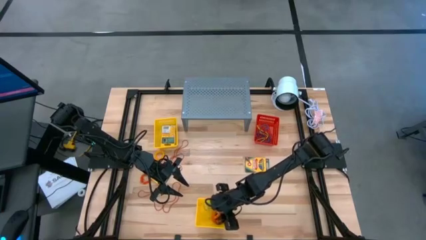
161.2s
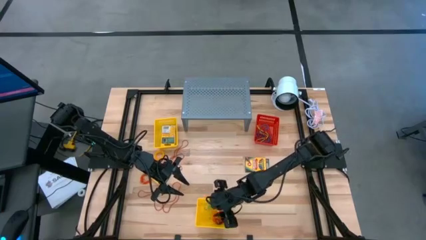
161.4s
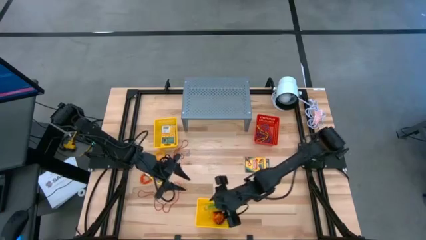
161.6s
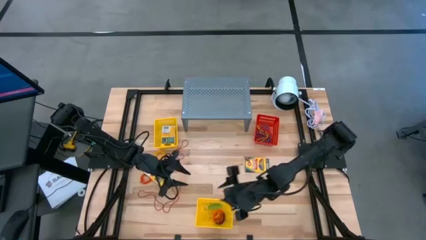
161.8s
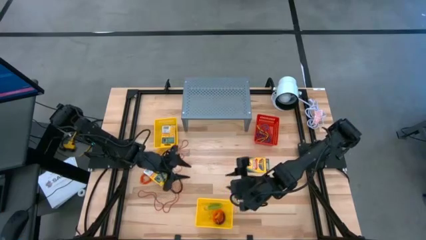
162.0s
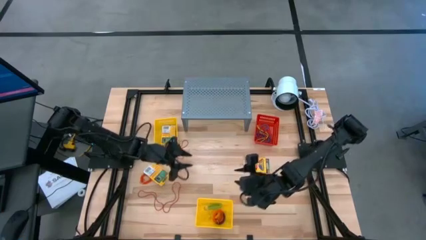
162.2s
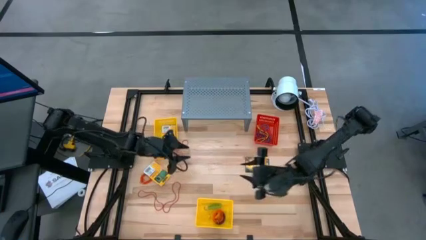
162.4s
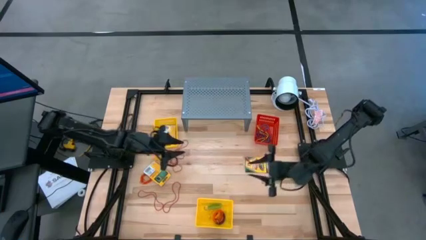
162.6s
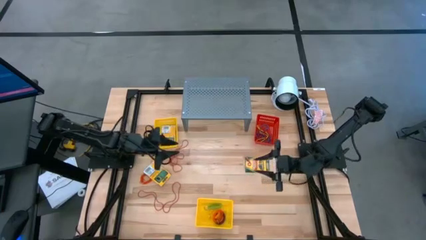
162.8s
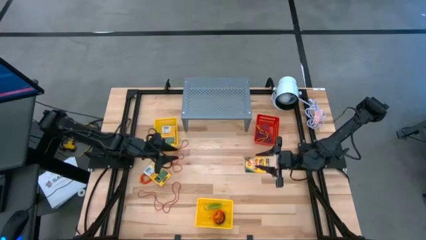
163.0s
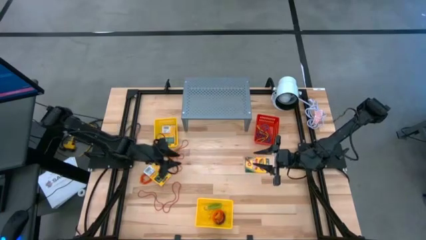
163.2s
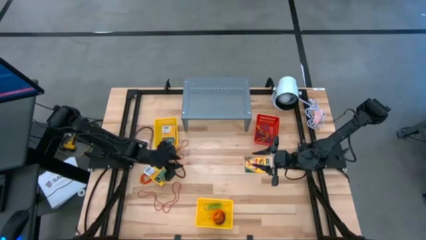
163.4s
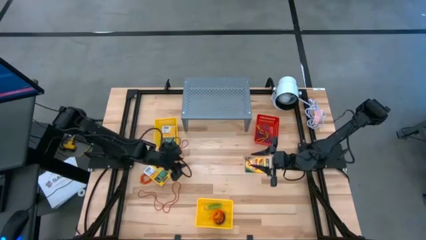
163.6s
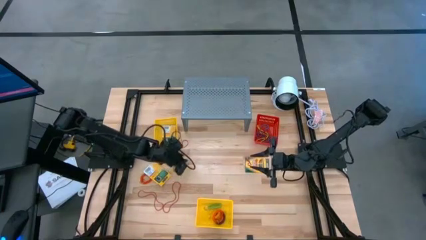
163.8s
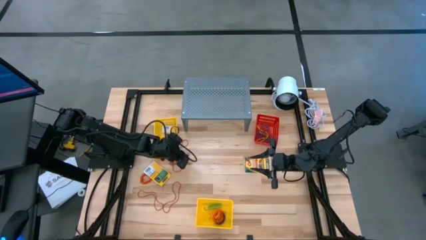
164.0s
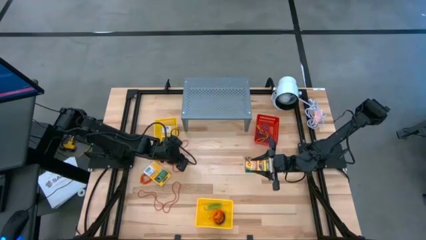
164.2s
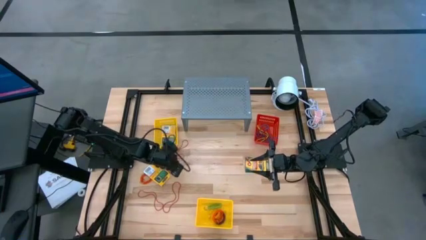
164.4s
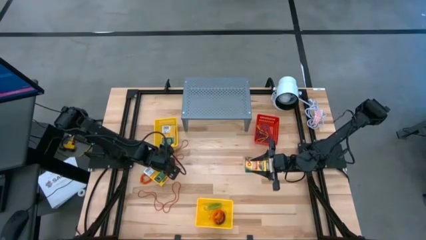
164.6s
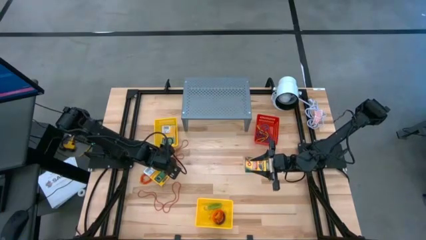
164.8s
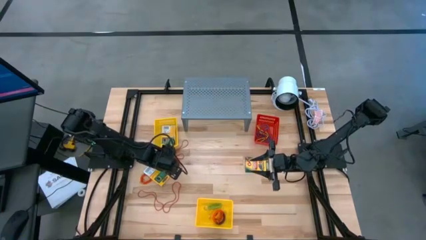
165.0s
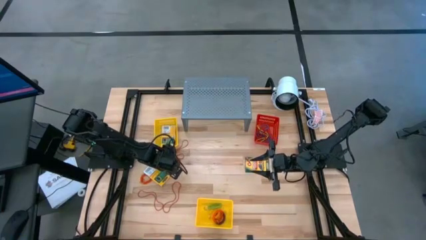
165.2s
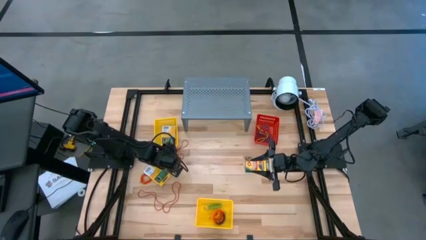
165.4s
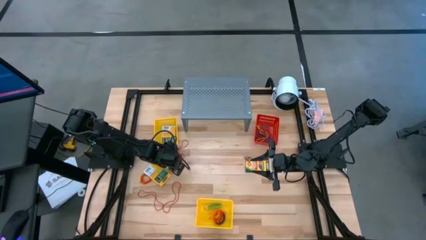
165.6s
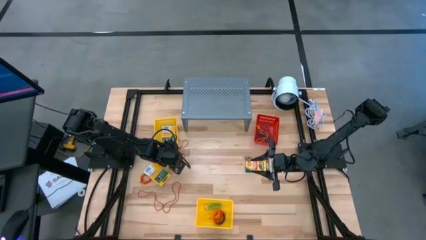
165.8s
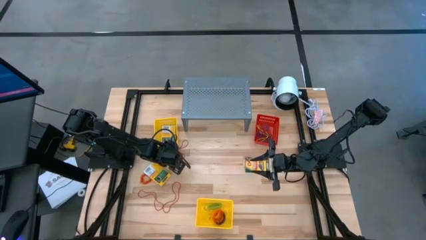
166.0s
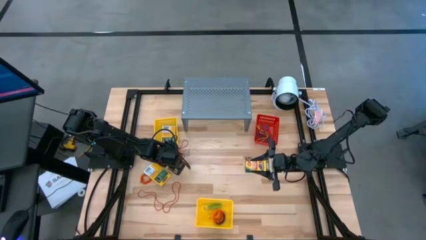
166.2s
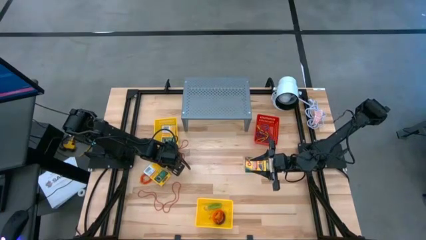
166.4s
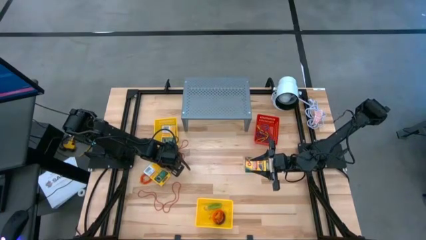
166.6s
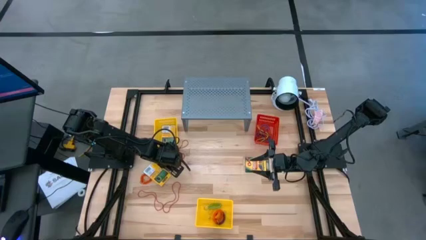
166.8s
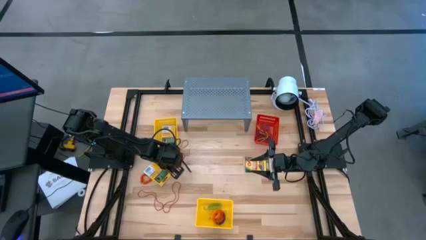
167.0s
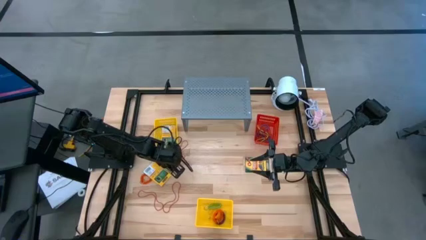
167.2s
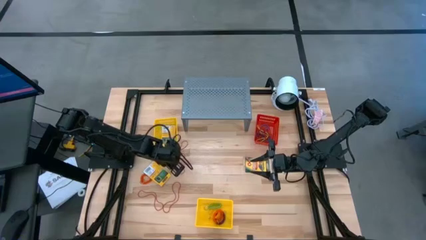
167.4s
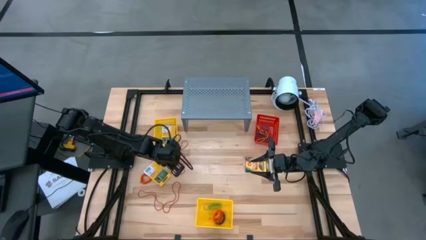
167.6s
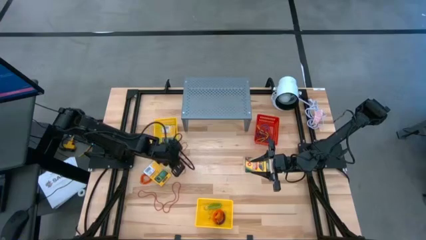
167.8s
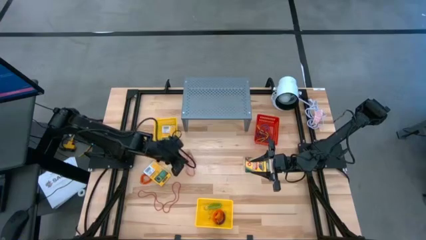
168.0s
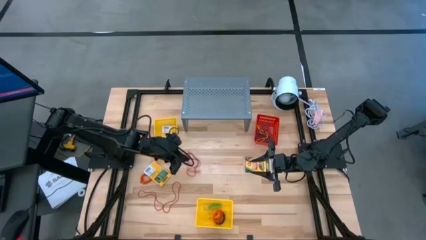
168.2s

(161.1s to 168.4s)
Task: Pick & Place Office Desk Supplies
Put the red rubber band into the red bin

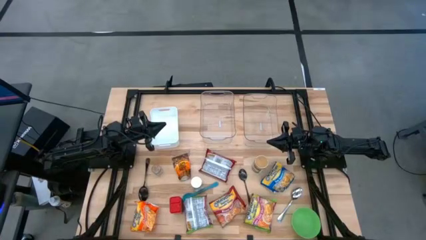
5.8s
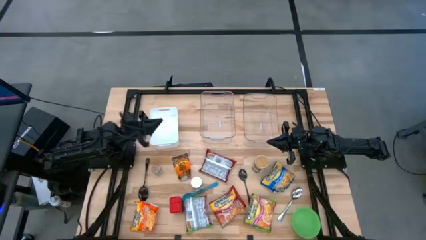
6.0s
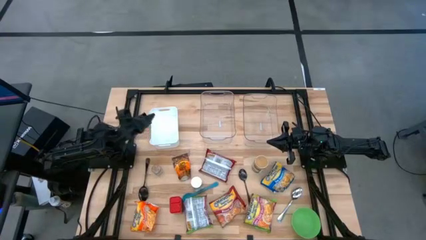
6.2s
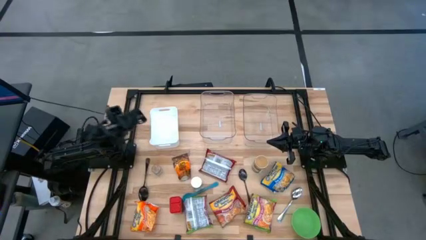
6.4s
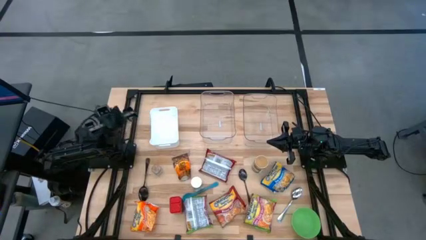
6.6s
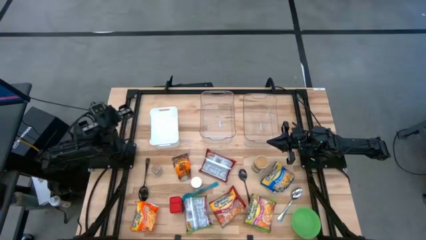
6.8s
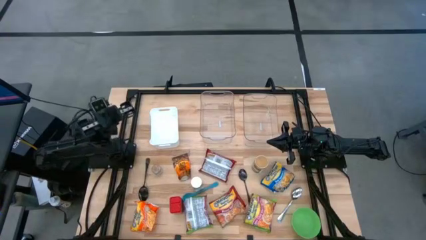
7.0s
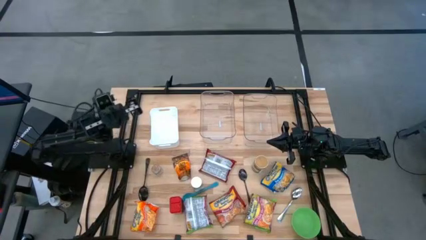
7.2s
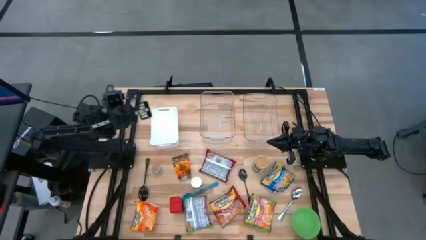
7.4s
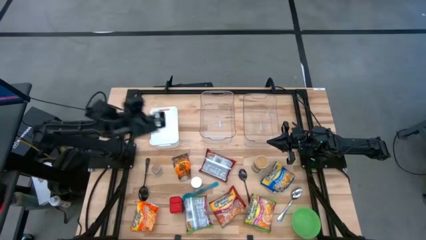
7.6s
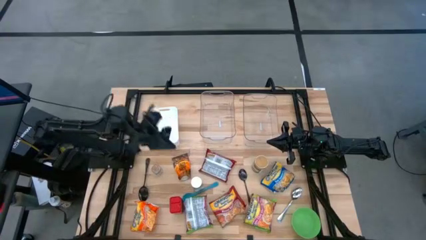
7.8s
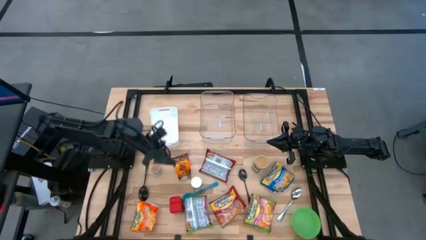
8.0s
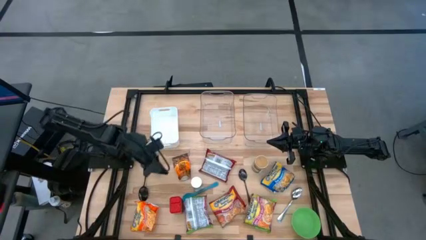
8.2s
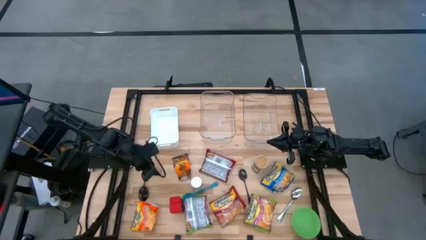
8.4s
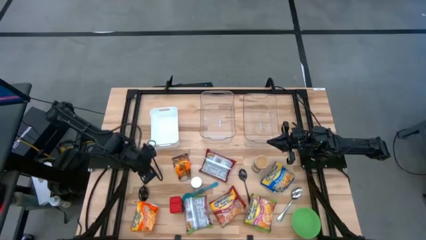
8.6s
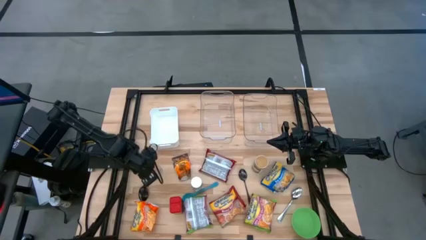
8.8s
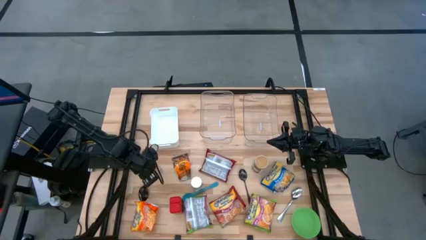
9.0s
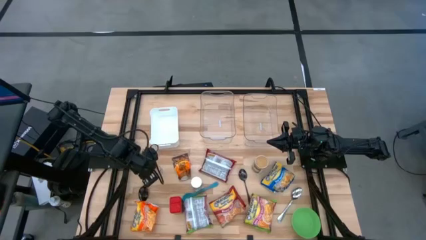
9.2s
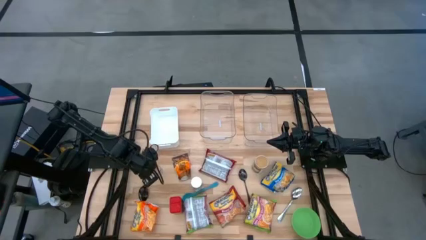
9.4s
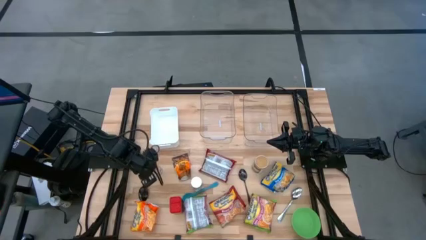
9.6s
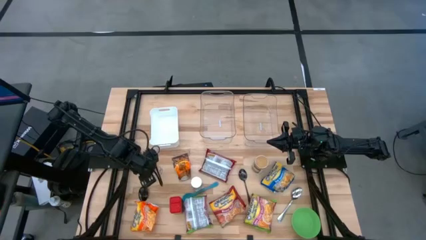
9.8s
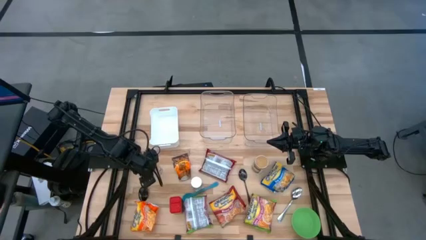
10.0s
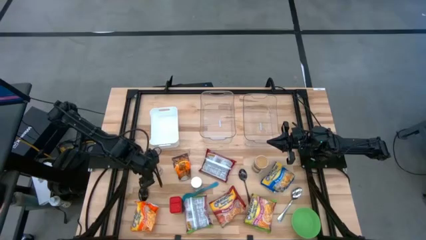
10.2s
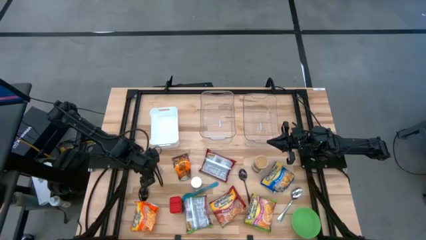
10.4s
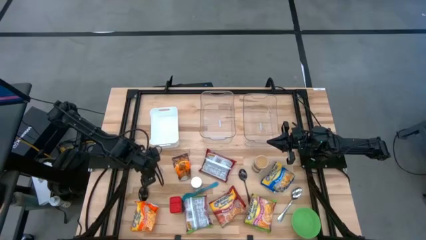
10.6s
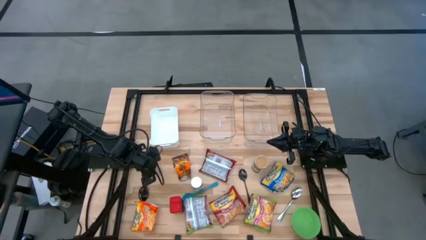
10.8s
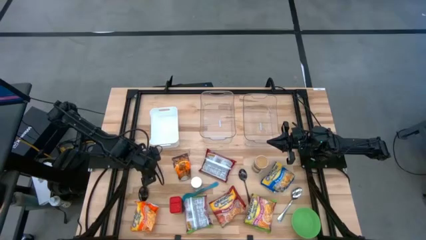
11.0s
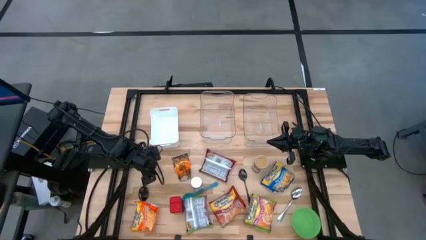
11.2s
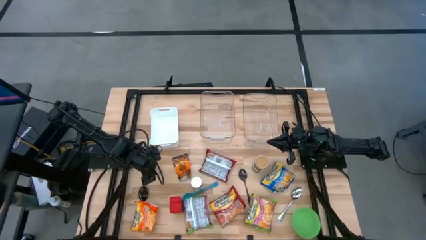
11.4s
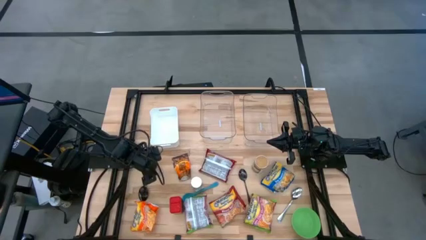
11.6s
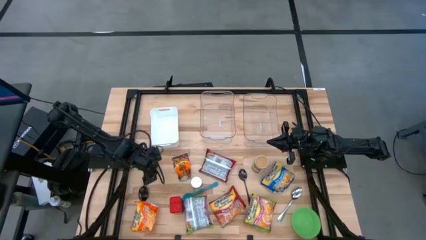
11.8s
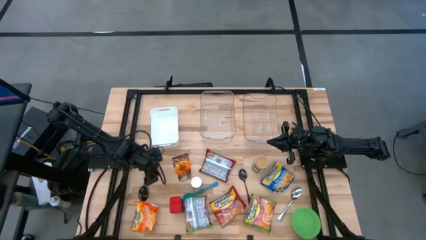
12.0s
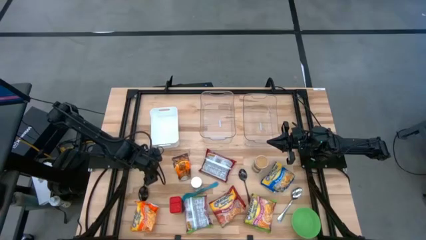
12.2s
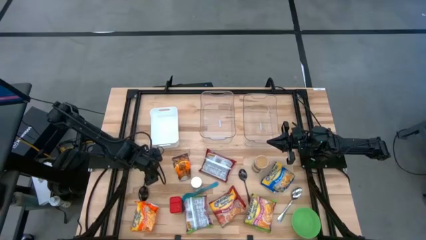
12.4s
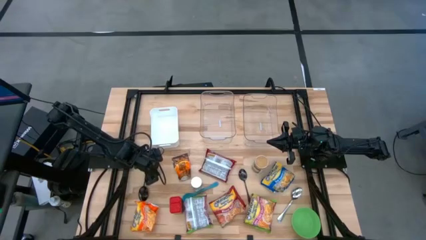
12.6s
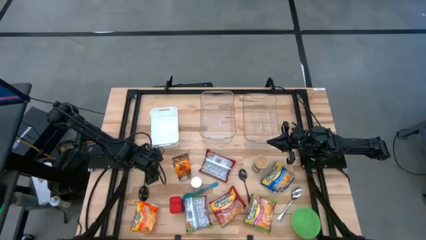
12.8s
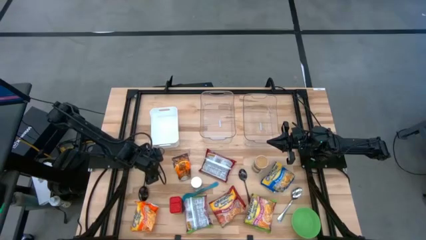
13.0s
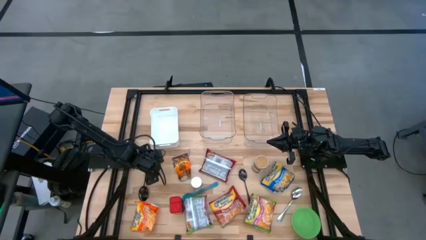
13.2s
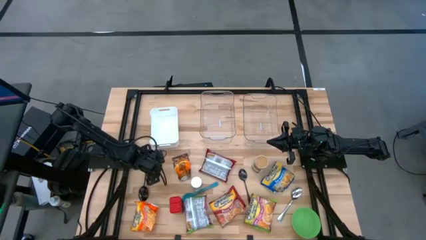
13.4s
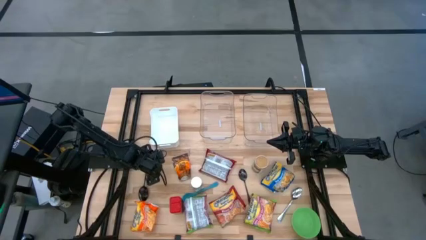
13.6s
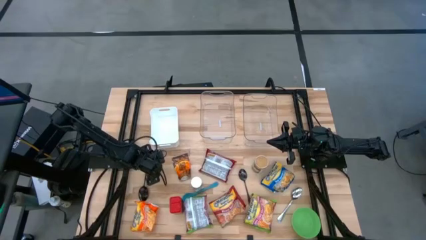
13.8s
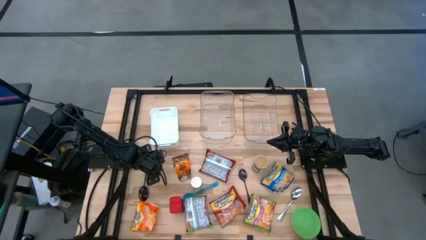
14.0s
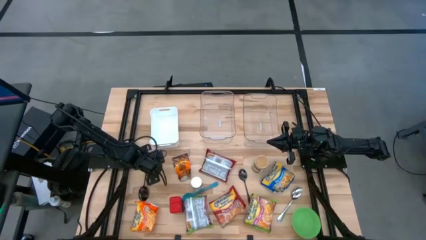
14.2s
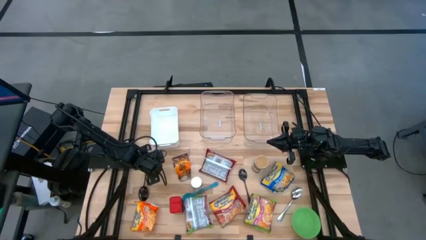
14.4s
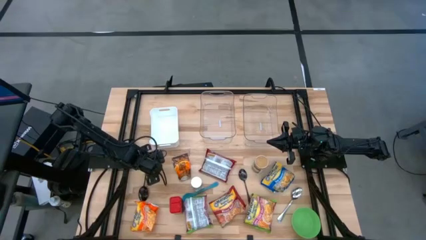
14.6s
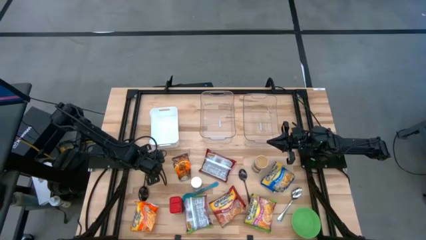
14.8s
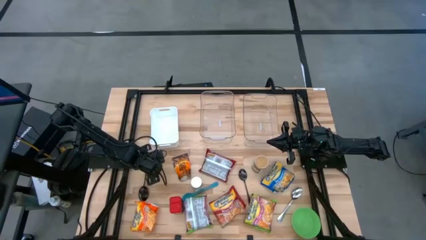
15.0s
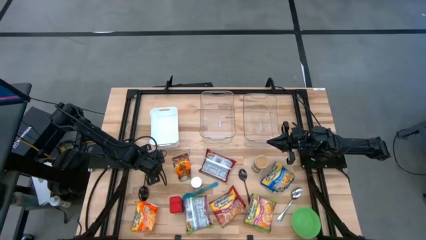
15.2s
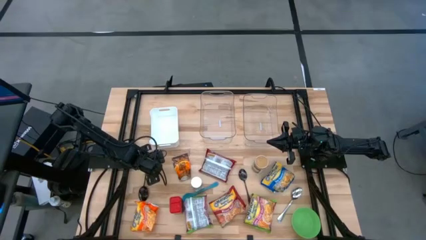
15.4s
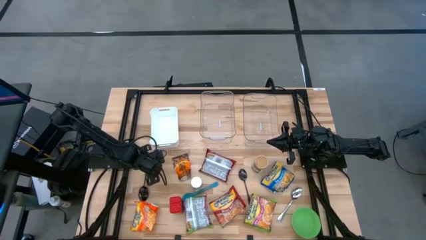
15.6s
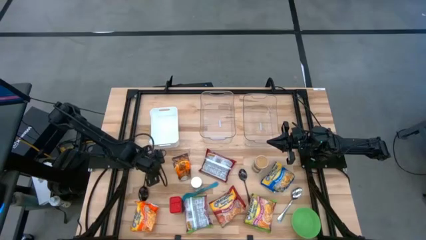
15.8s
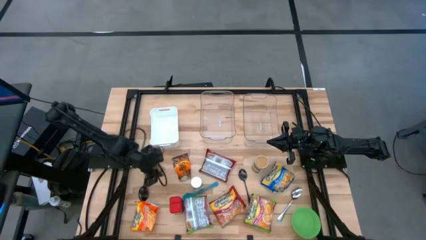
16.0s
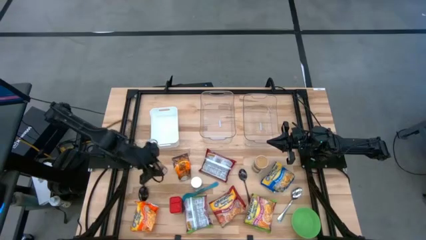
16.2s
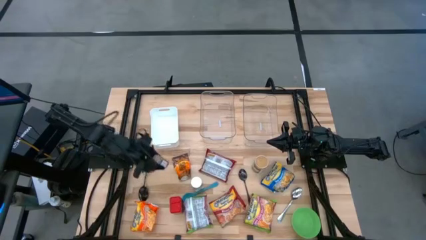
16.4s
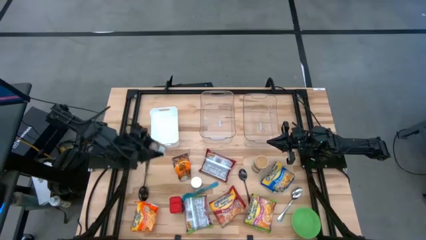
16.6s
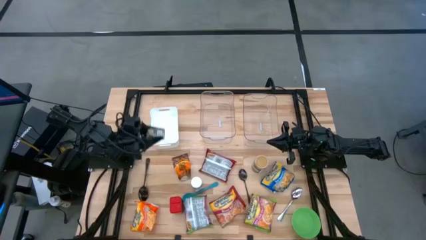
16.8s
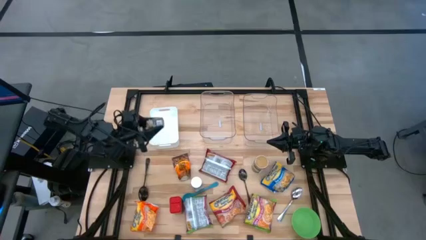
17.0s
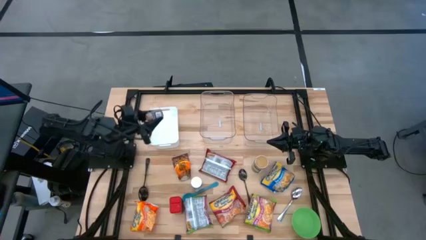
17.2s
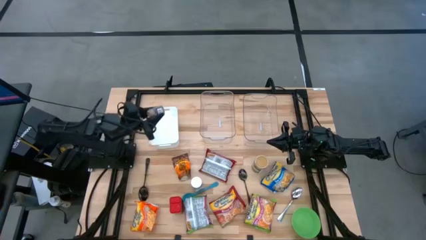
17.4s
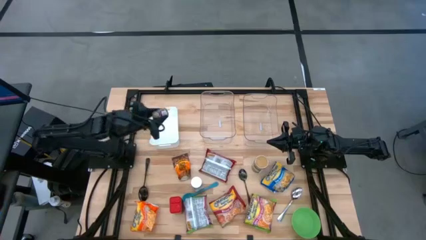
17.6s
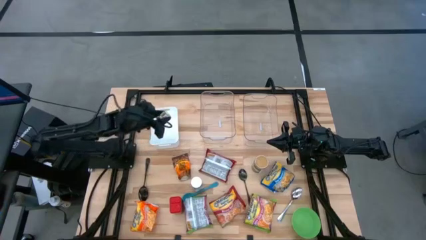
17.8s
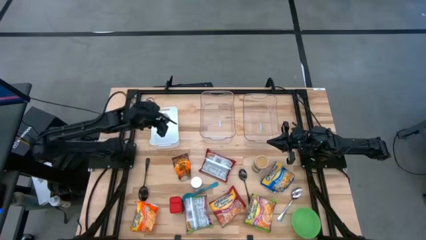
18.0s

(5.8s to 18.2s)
Task: Pick & Place Food Item
Put the brown seasoning bottle into the white bin
